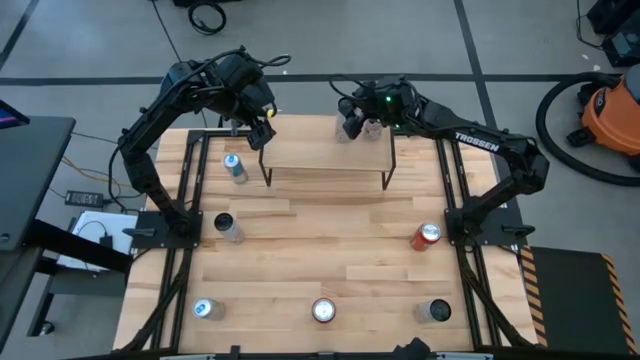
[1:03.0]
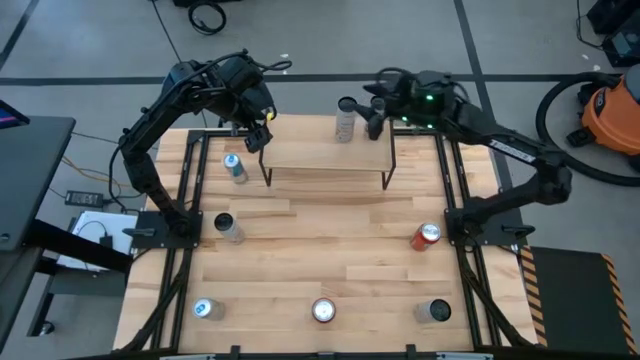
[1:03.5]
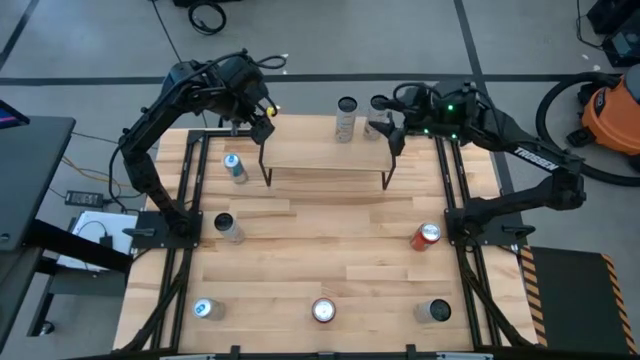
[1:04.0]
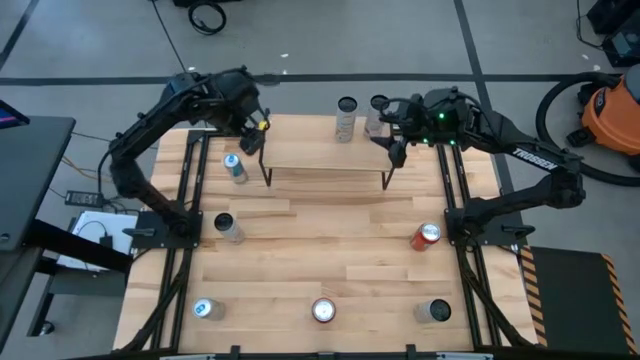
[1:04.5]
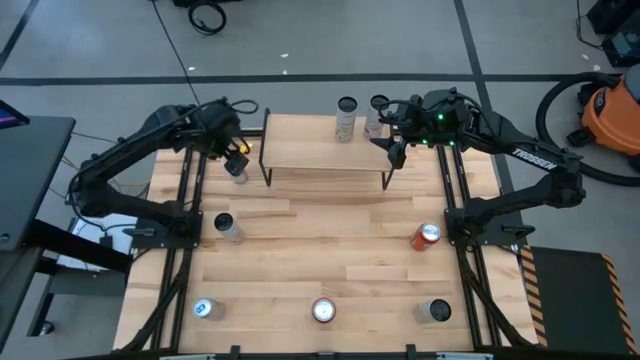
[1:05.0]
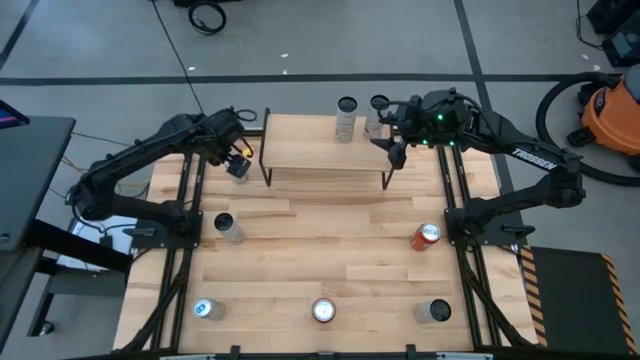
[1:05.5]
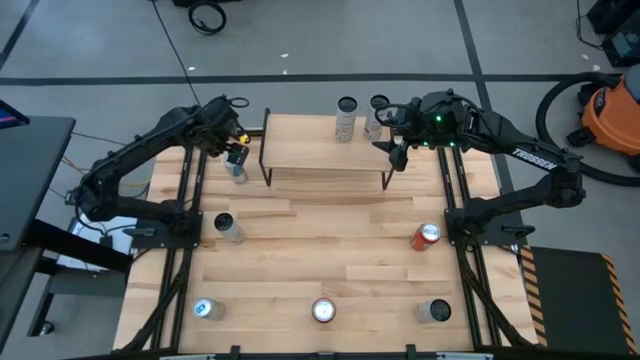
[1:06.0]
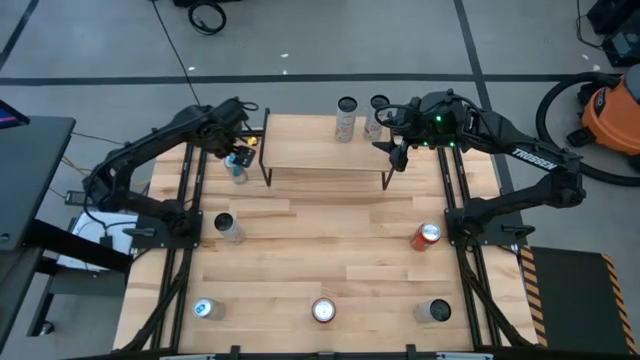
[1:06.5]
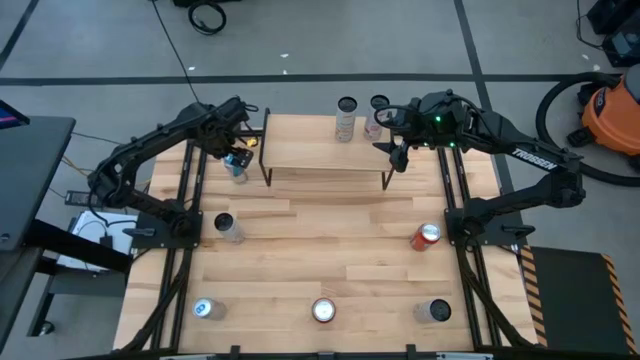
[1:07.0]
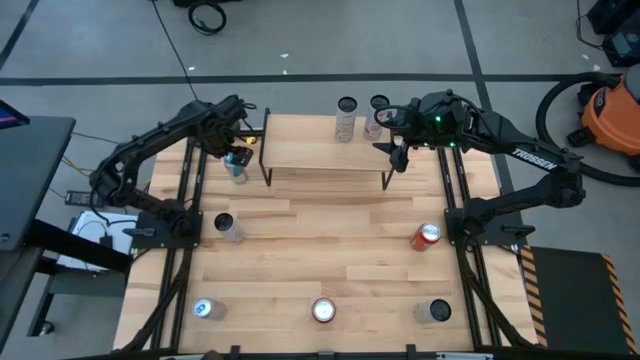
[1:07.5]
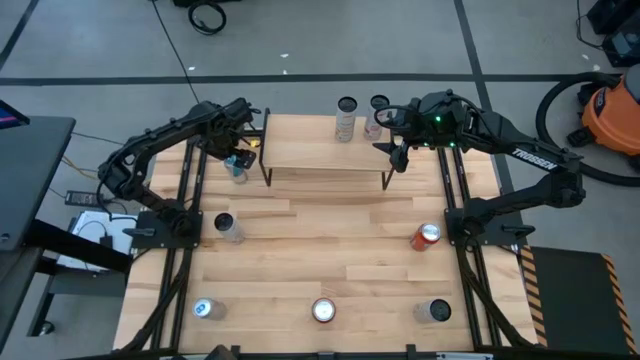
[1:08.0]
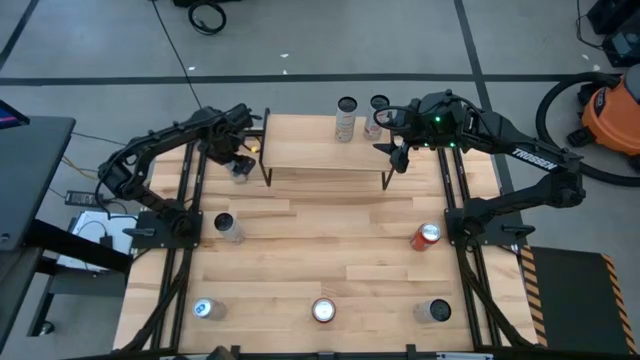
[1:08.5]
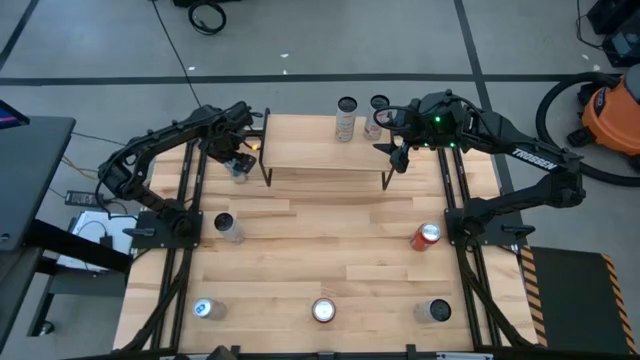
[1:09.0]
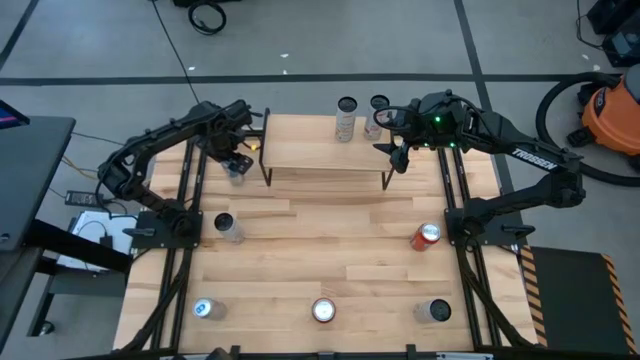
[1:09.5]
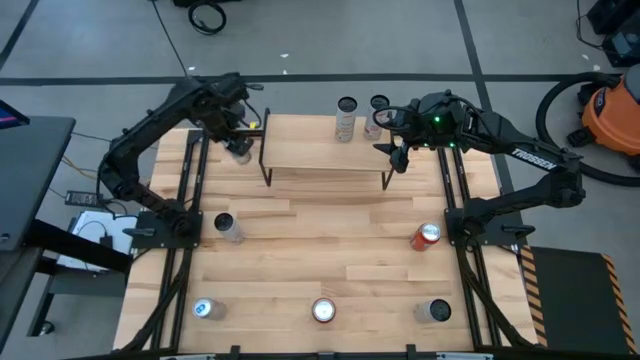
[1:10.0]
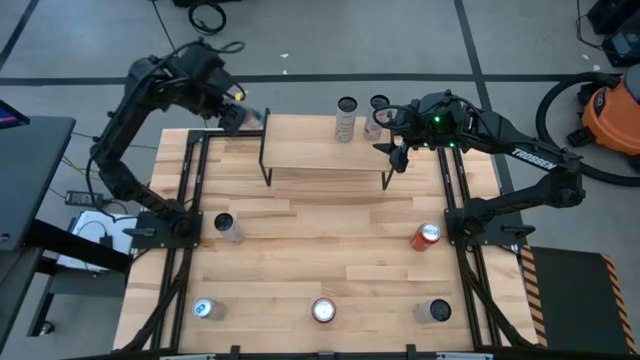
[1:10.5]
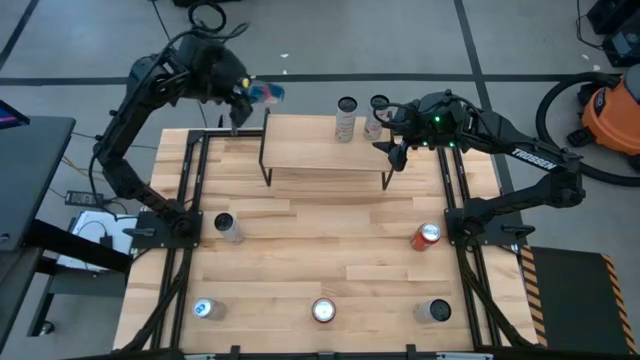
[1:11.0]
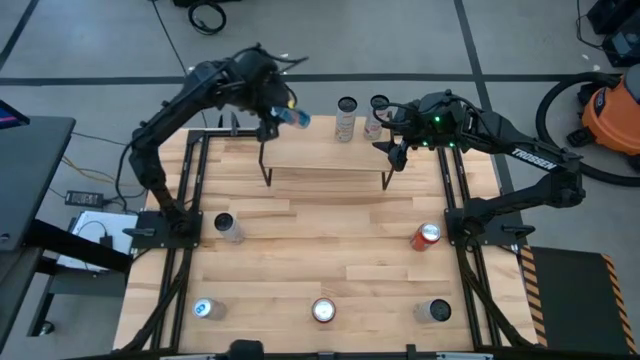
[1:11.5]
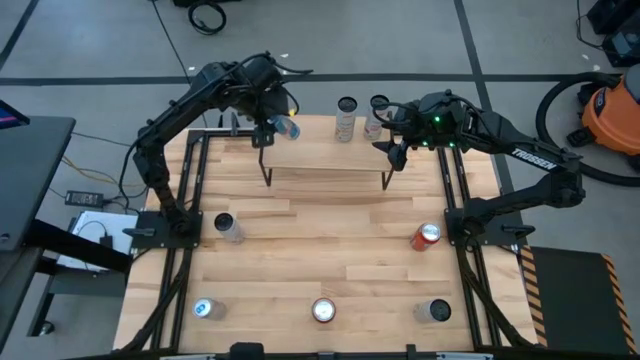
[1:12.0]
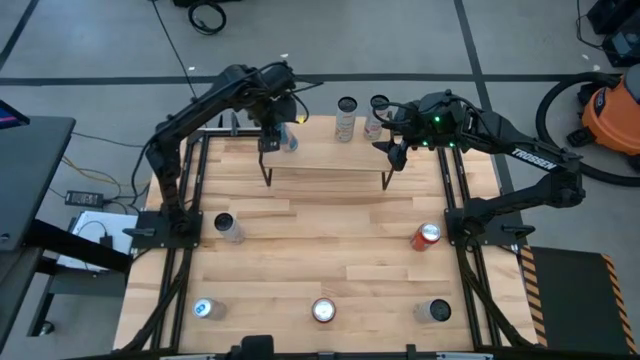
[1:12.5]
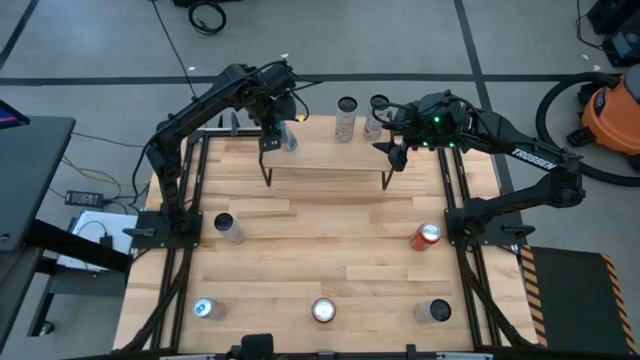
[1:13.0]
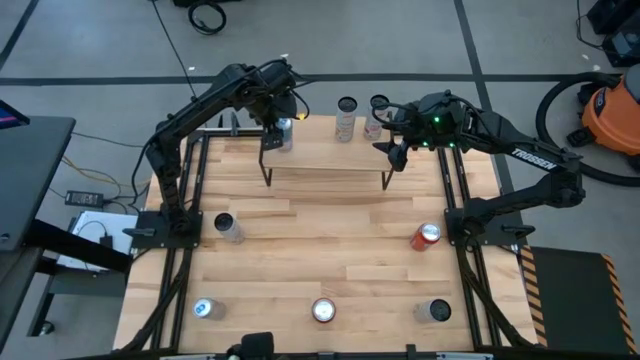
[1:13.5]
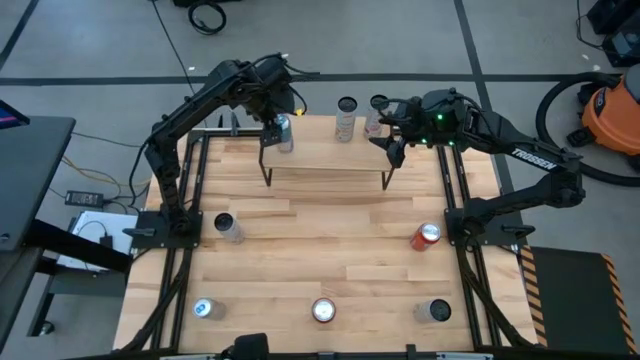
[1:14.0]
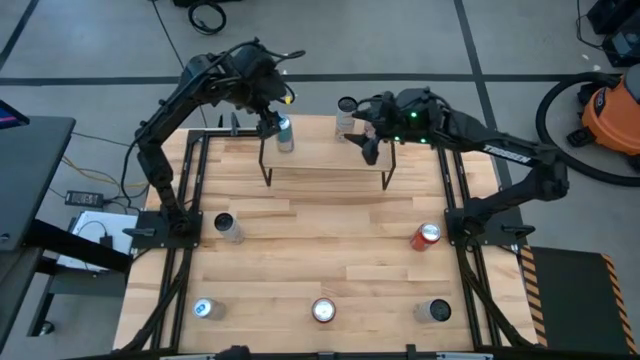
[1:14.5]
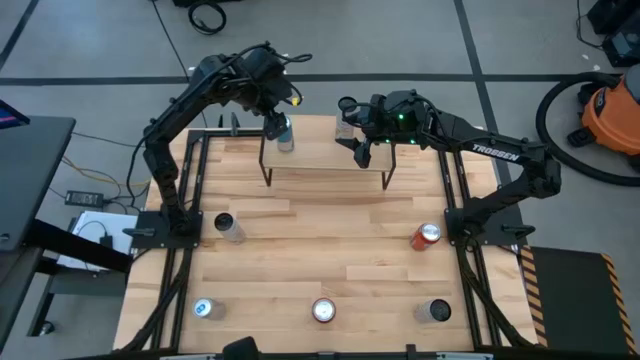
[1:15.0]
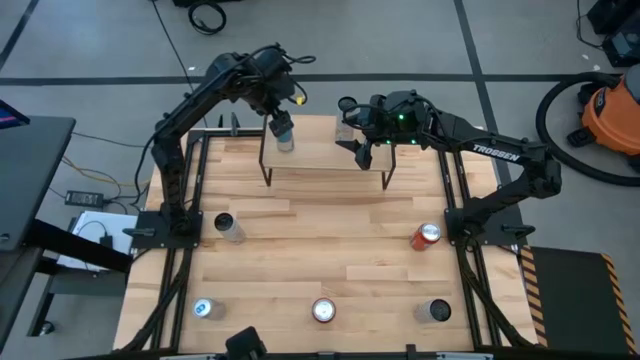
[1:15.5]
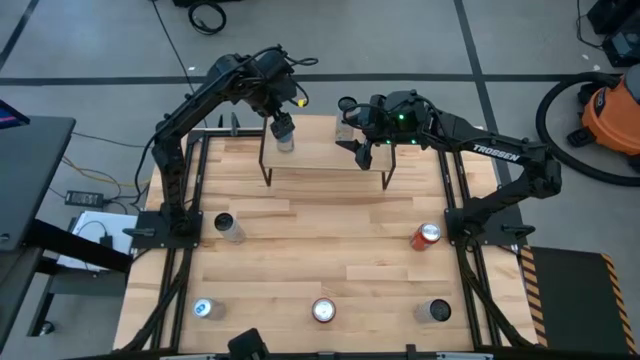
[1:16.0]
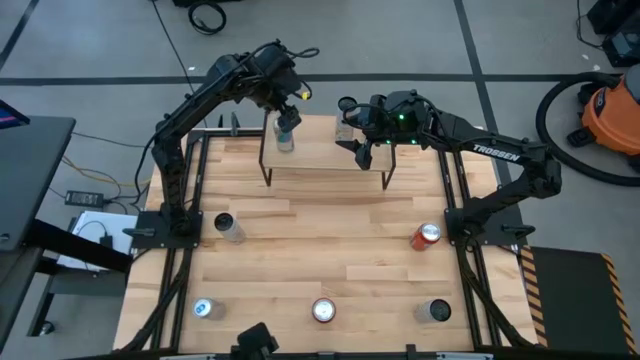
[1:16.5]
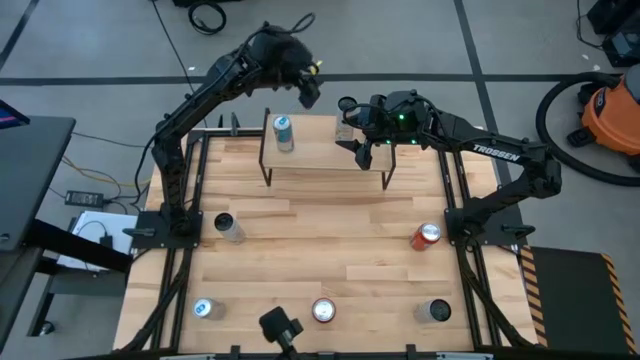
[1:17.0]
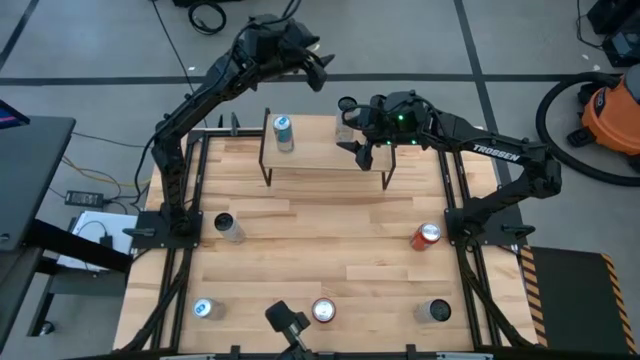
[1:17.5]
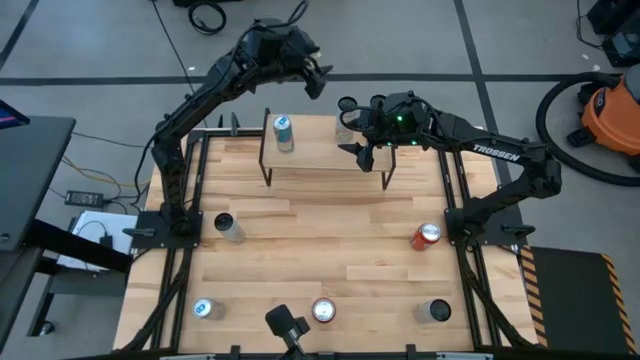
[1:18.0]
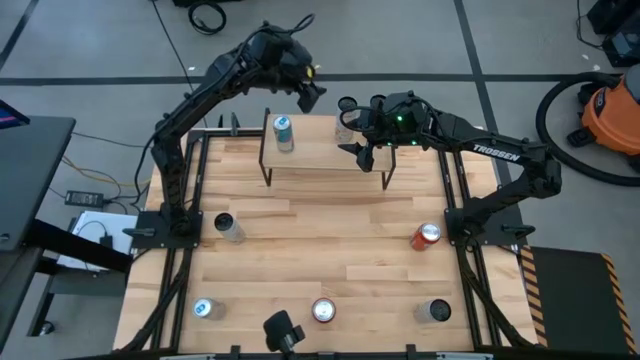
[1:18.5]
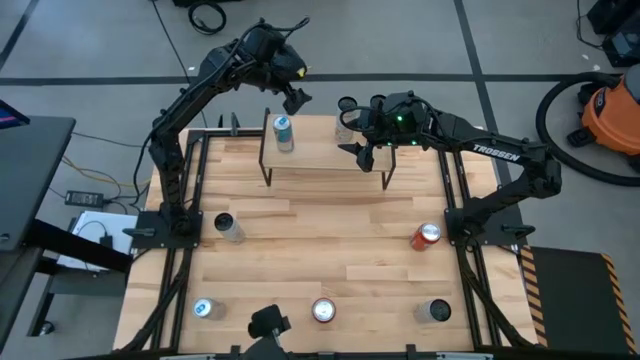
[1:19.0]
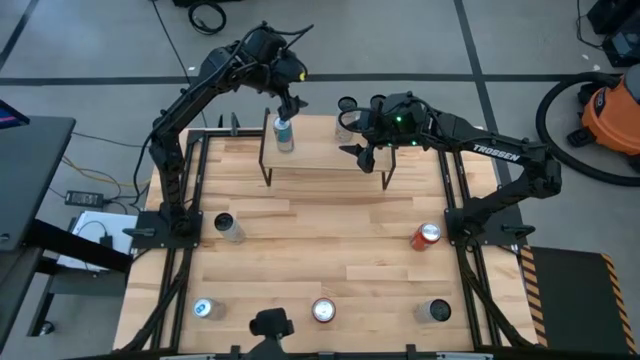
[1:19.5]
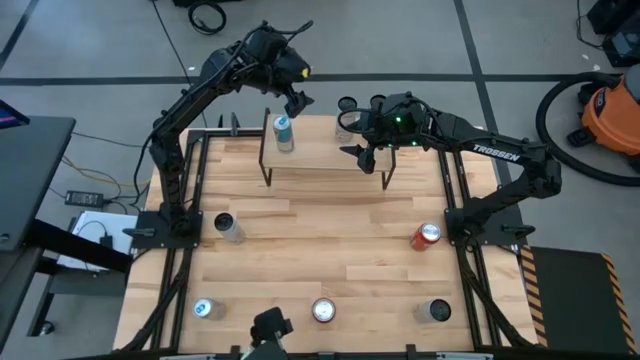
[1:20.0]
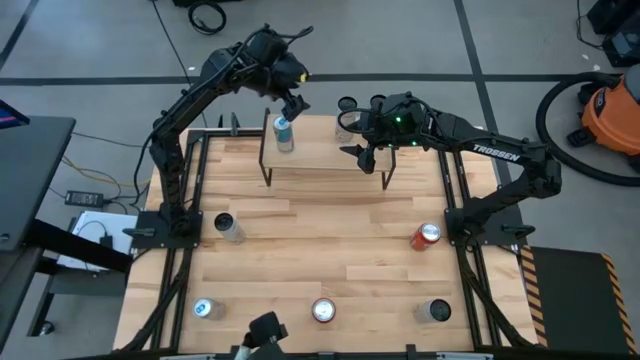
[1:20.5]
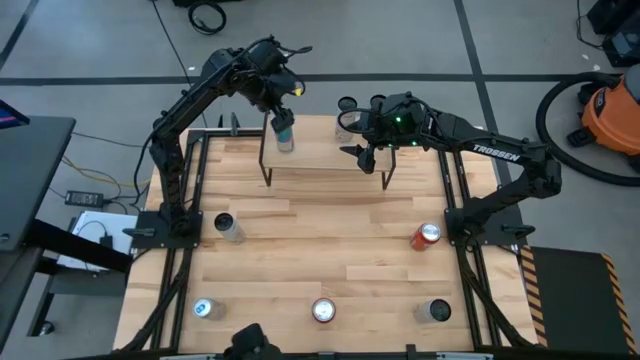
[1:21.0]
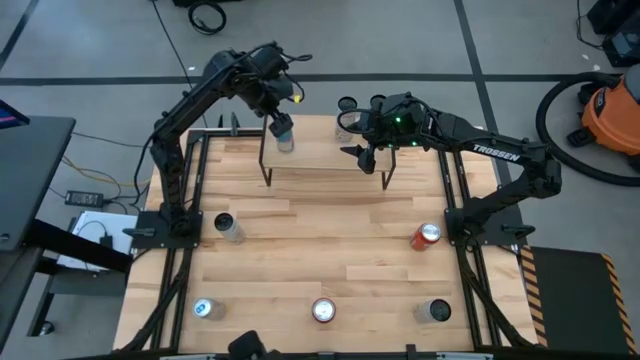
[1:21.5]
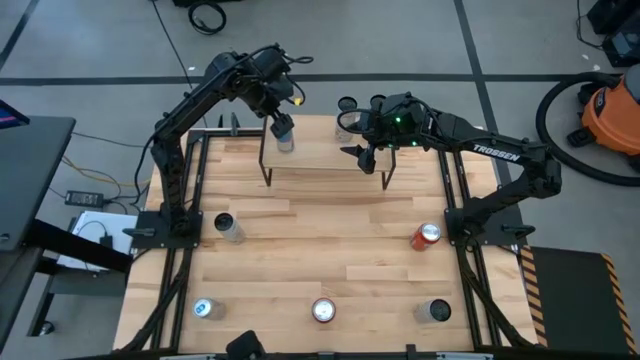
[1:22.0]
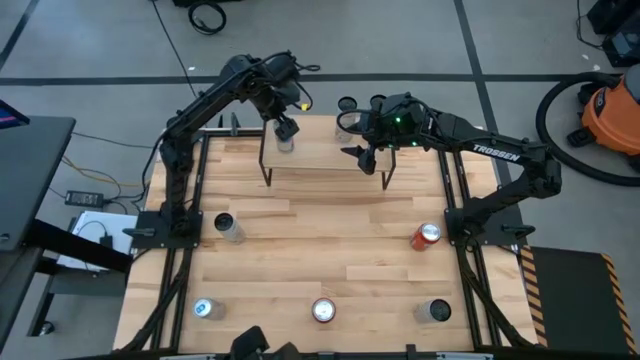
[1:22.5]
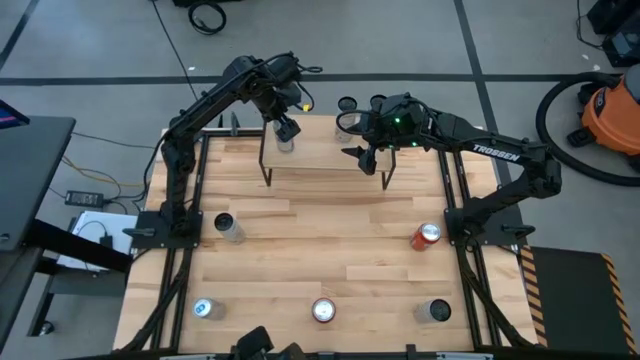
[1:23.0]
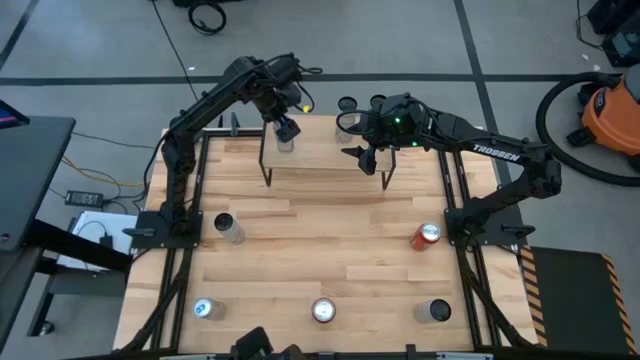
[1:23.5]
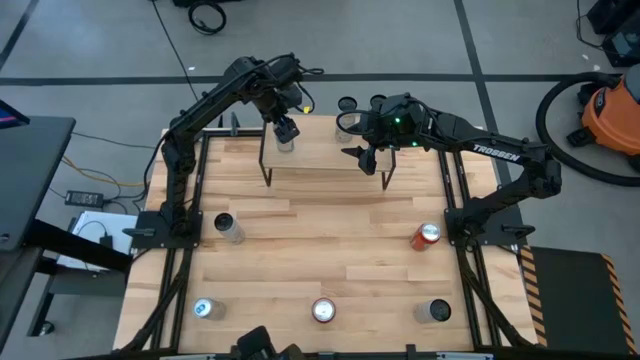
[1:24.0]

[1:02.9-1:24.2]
Task: Place canned beverage on shelf
Put the top blue soda can on the shelf
